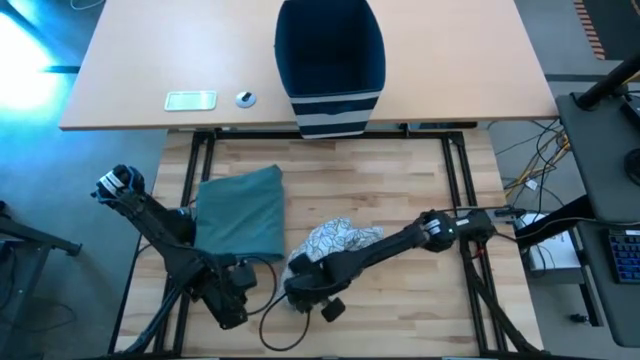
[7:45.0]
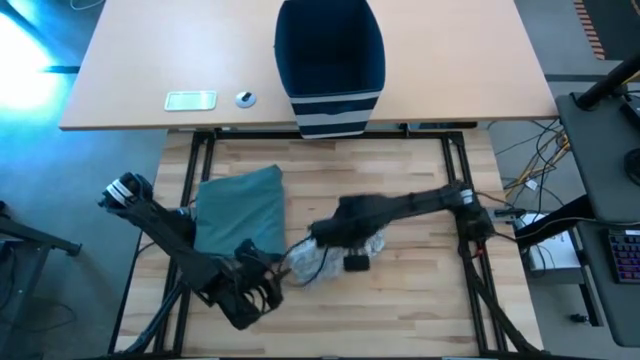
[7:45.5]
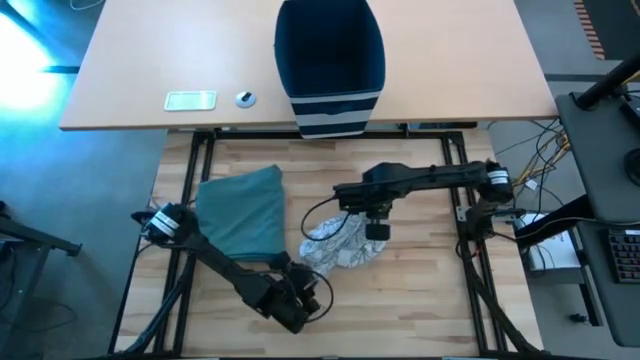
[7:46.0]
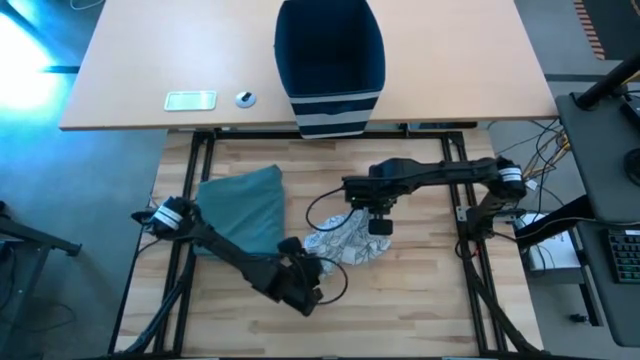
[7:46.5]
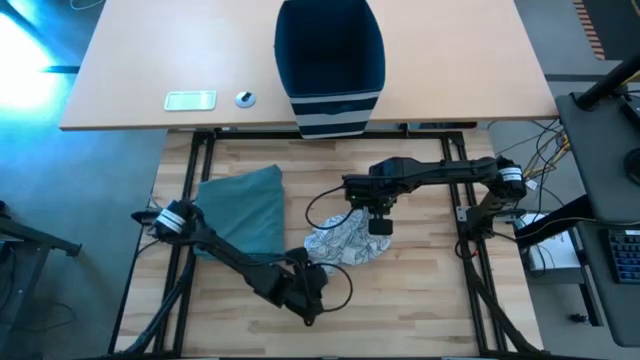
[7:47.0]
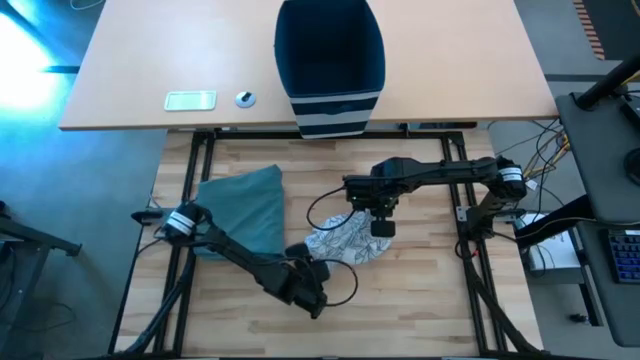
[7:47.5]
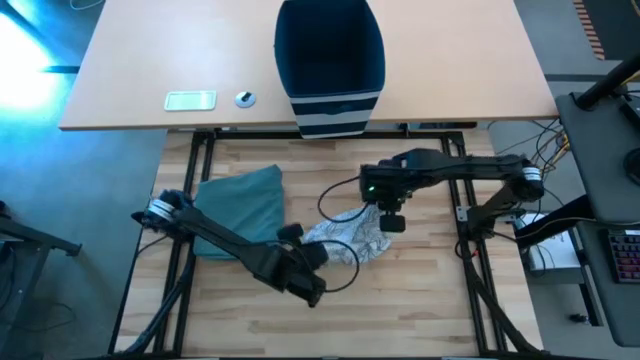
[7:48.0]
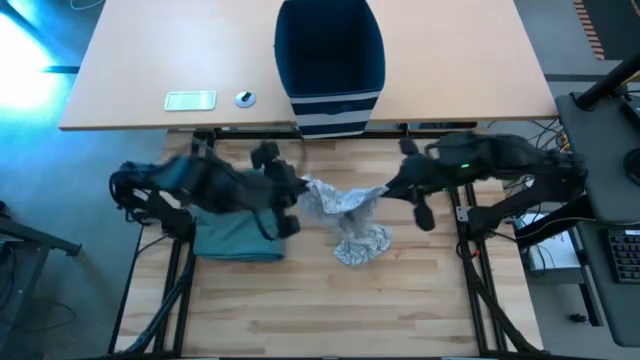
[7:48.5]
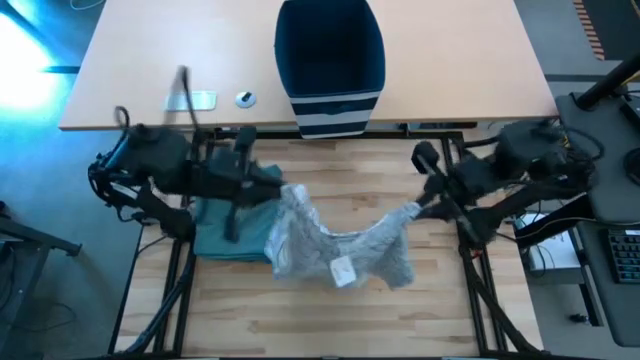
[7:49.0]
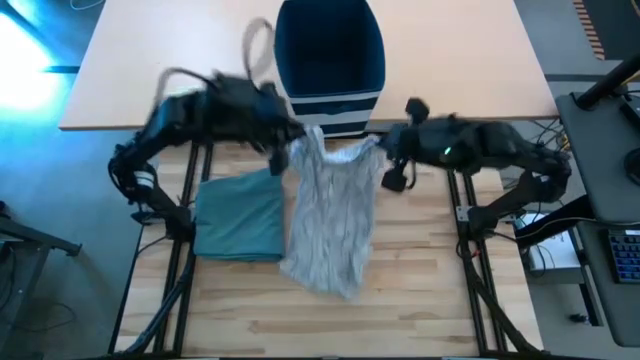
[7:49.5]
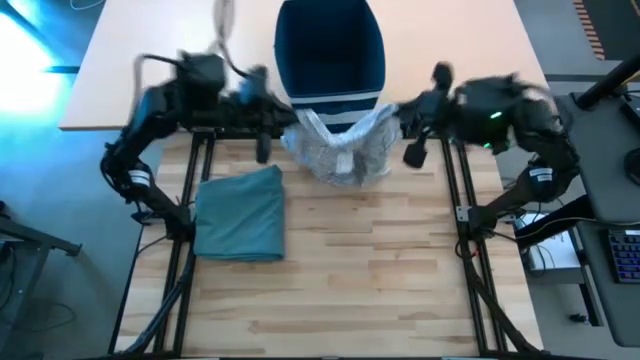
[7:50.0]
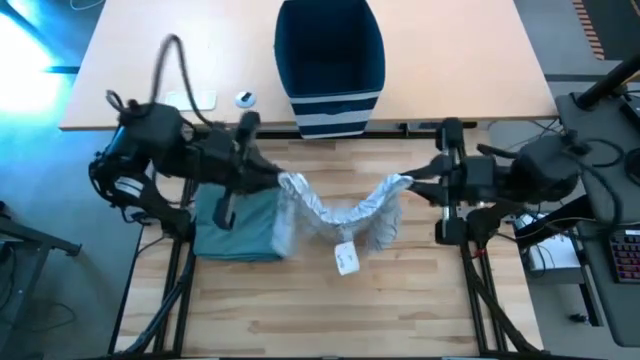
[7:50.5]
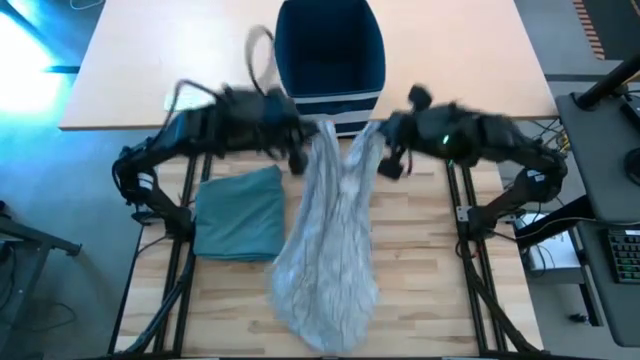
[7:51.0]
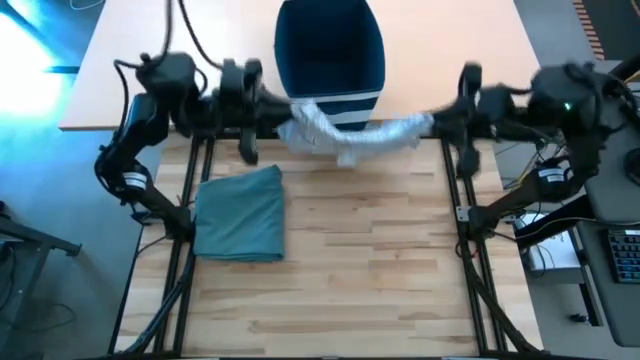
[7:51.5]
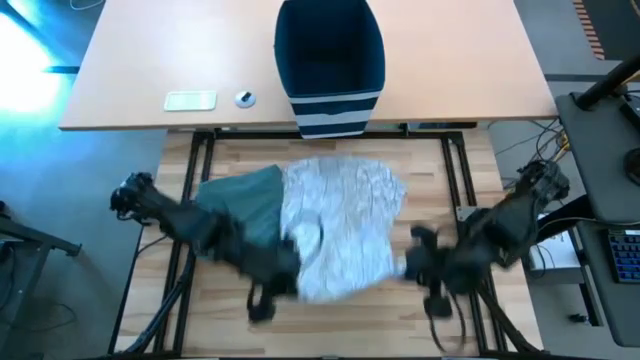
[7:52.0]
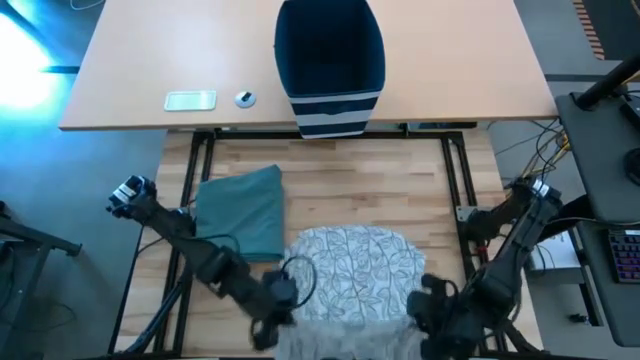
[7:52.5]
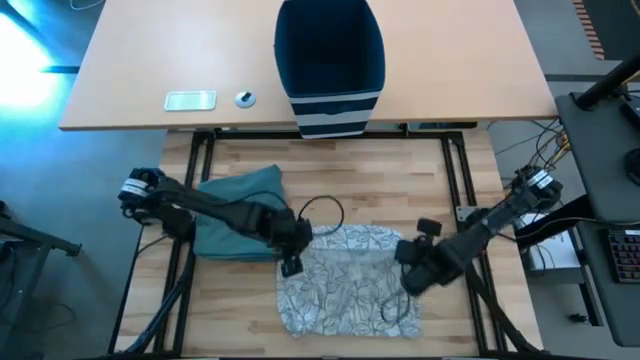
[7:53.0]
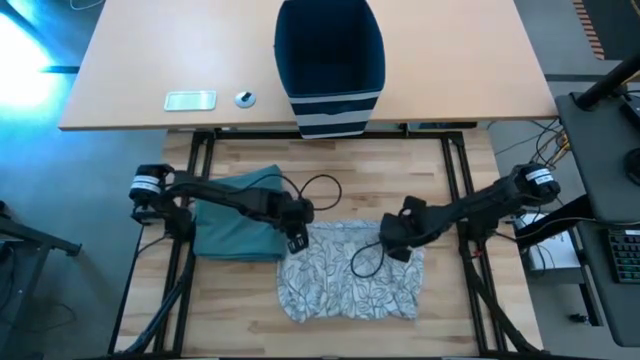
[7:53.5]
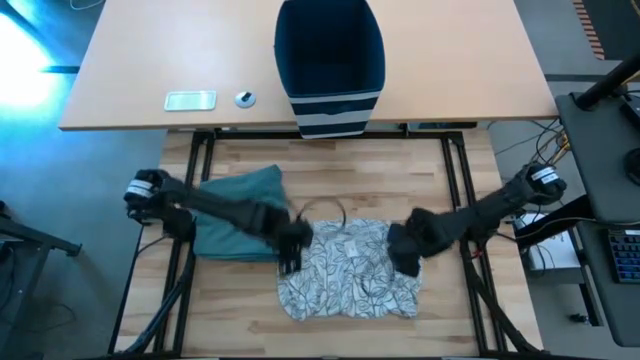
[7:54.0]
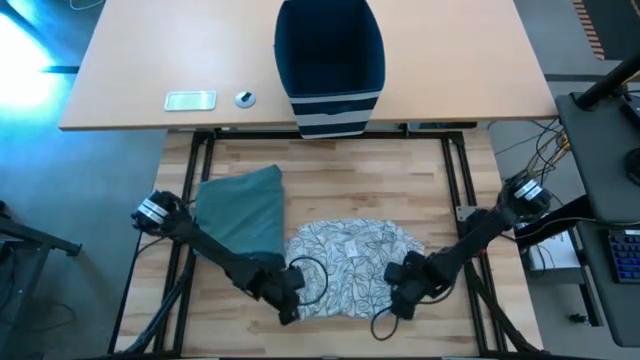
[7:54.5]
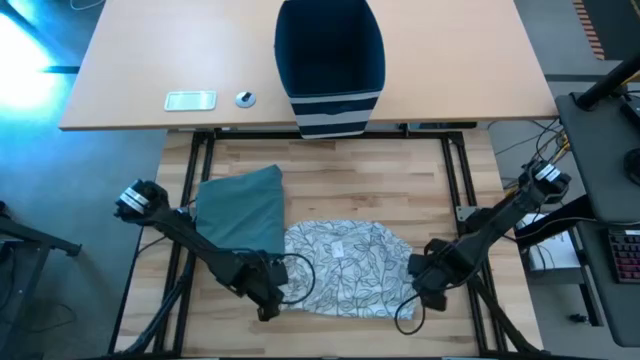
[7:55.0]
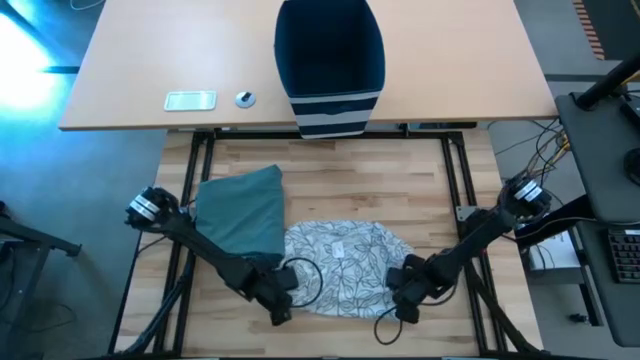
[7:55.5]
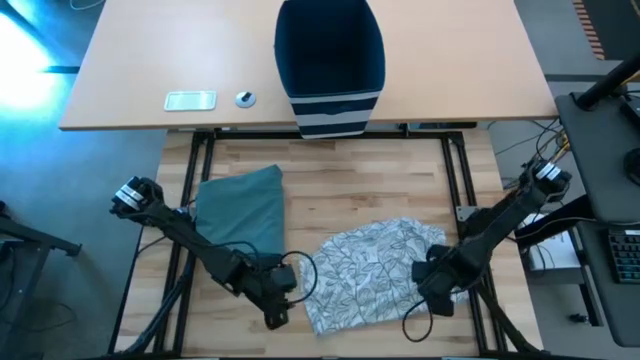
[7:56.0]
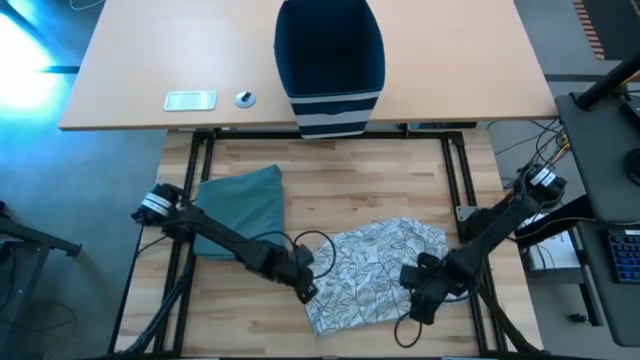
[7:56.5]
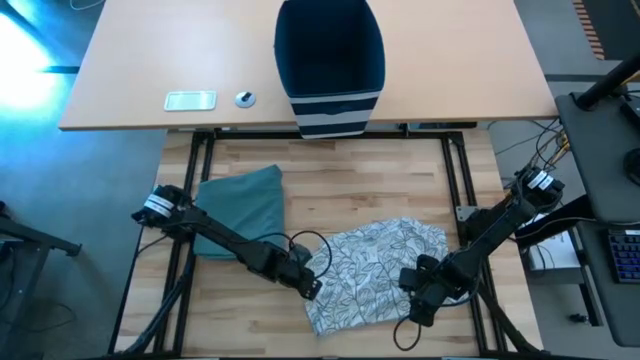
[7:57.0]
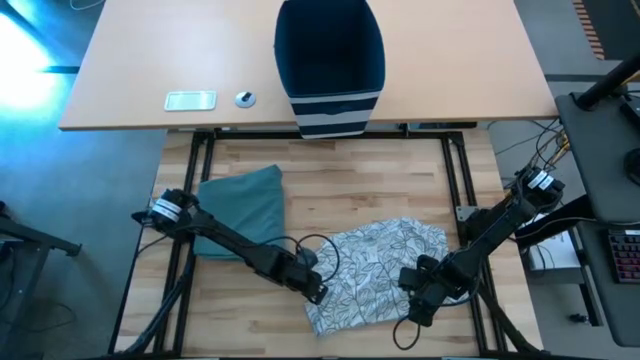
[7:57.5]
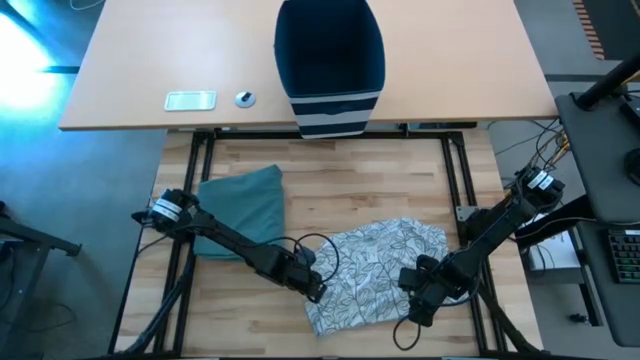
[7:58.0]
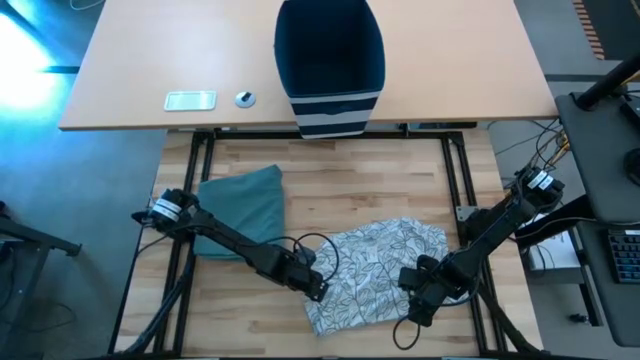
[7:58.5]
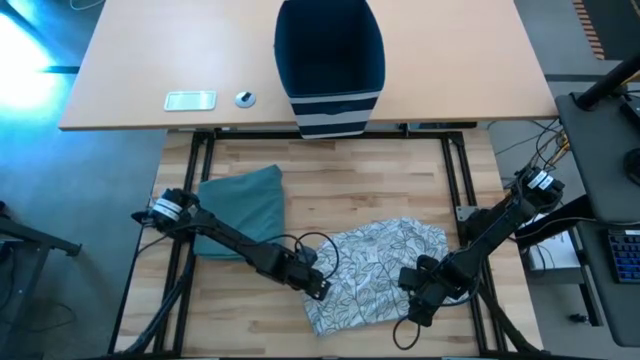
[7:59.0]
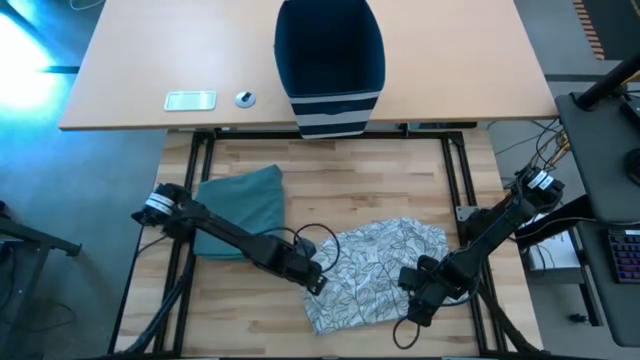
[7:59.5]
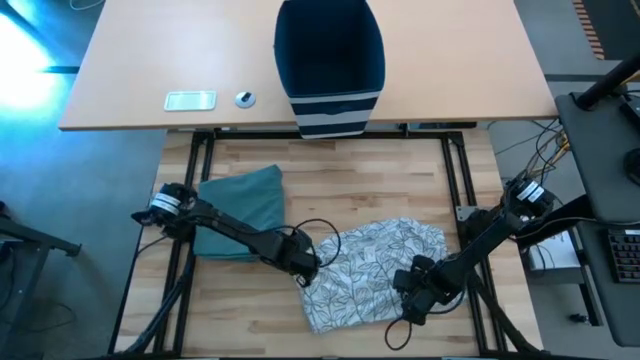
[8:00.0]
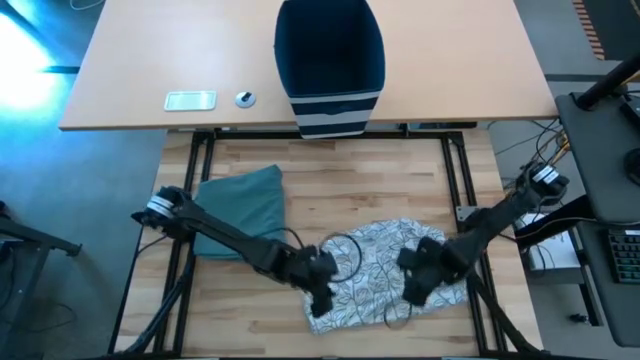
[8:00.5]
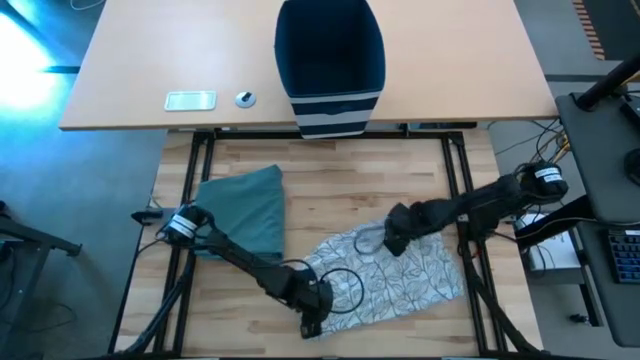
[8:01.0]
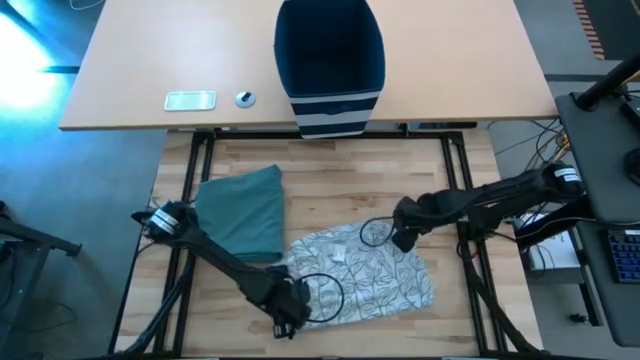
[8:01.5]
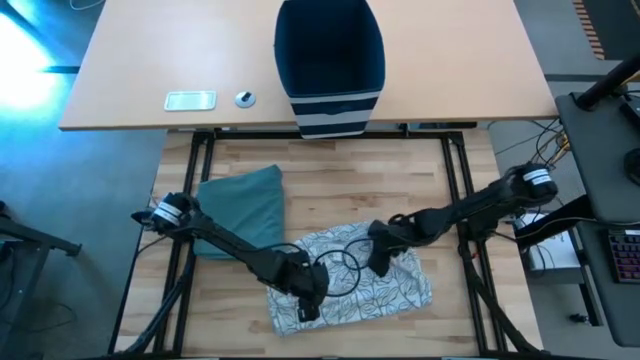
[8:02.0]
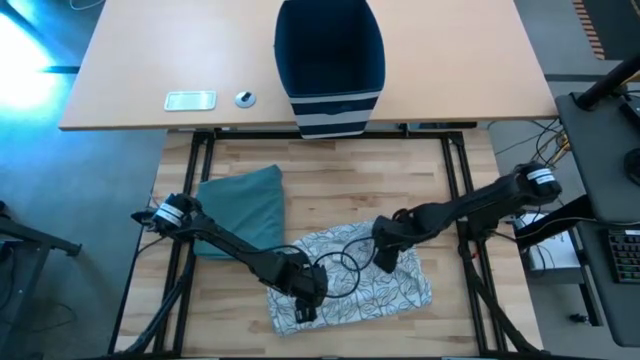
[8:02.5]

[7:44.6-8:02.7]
Task: Fold Laundry from Bin
Fold the white shirt

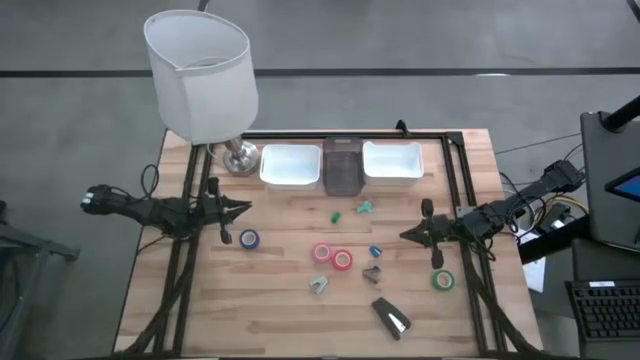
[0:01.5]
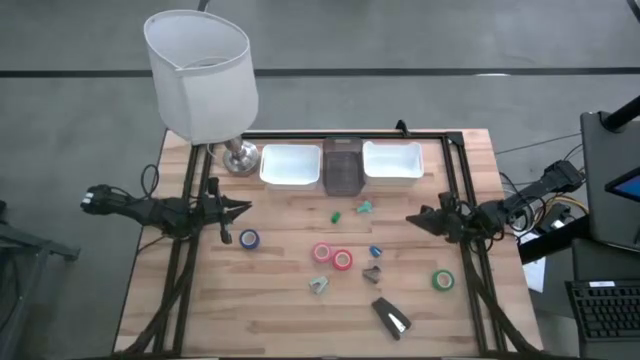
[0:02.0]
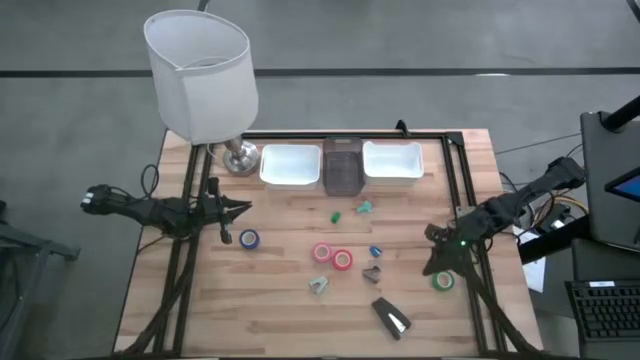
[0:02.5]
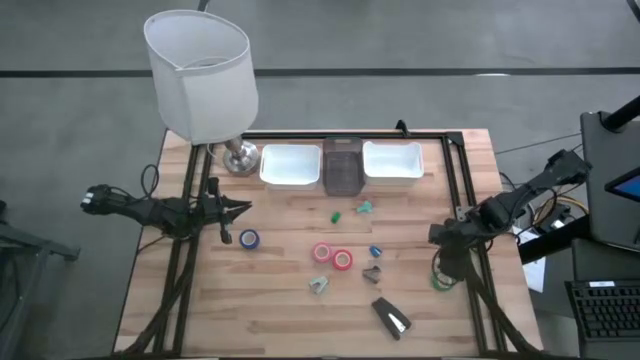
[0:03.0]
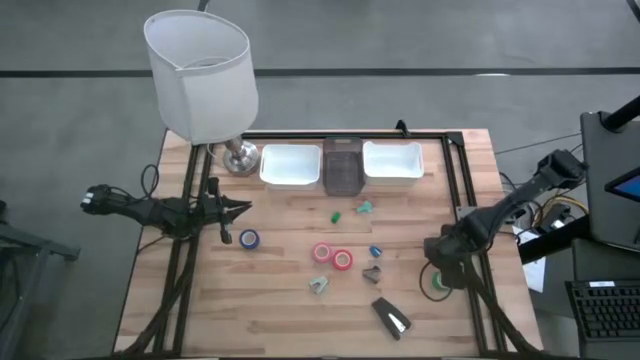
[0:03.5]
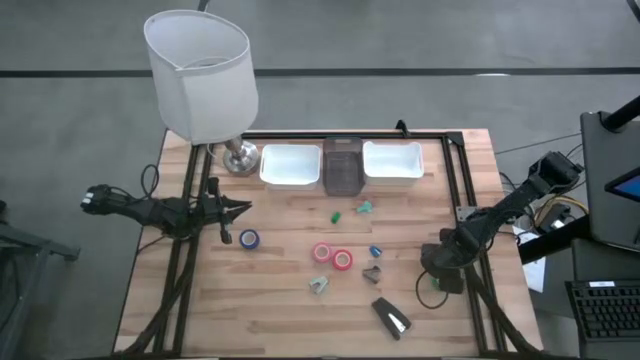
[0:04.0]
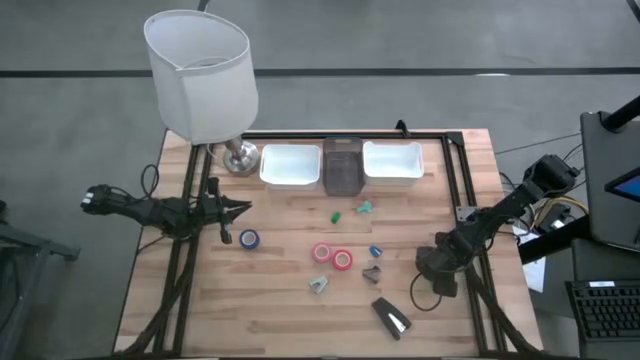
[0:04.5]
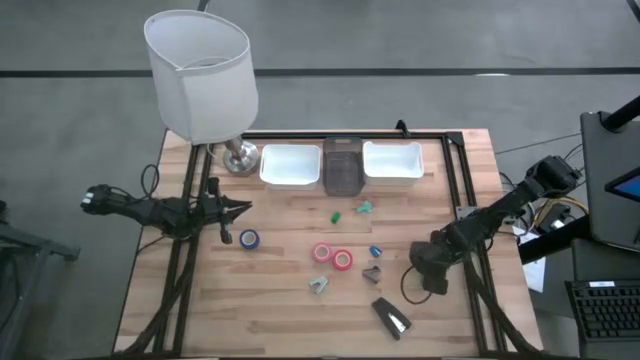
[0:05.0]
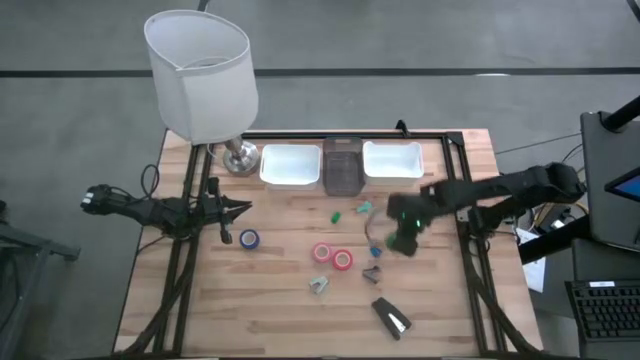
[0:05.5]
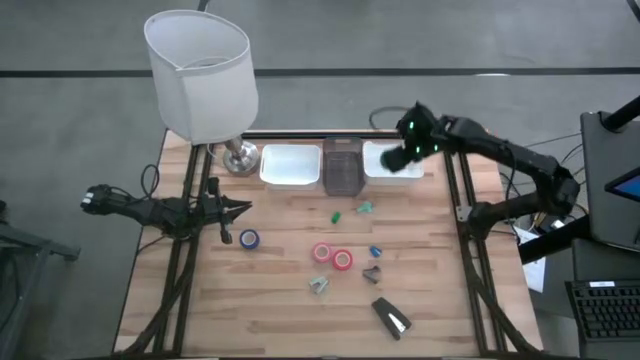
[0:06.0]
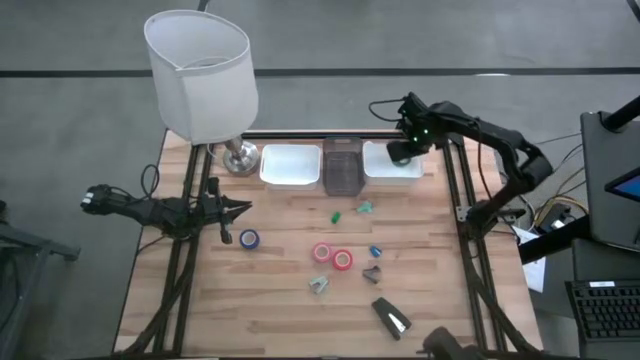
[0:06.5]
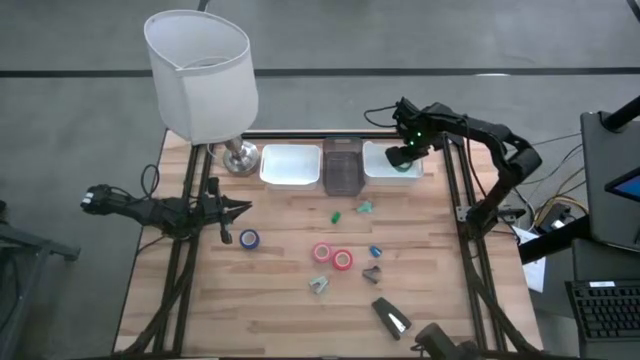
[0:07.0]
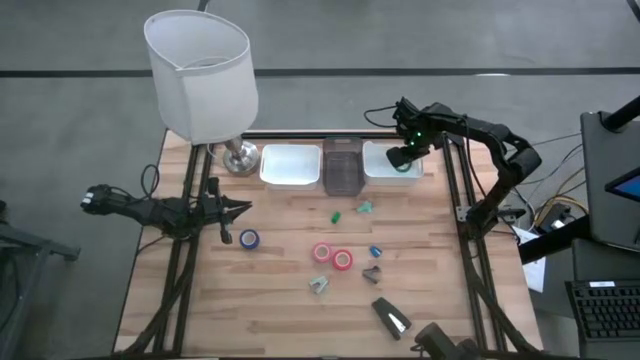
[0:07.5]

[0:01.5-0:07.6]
Task: Pick and place Stapler, Stapler remover, tape
Put the green tape into the right white bin
